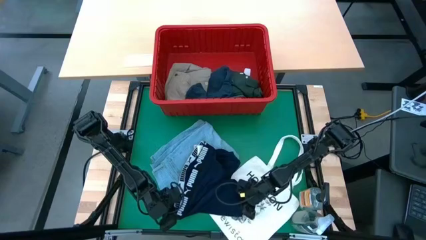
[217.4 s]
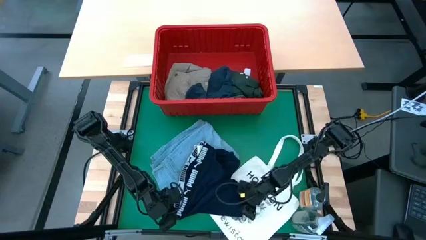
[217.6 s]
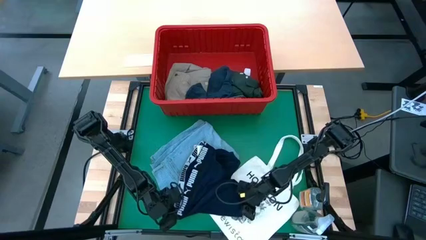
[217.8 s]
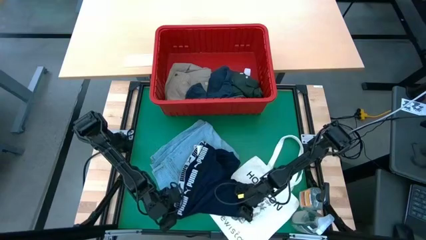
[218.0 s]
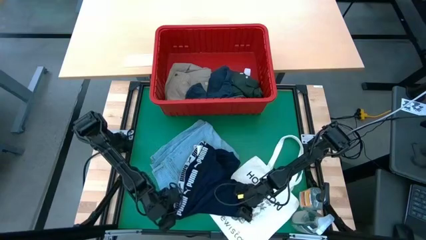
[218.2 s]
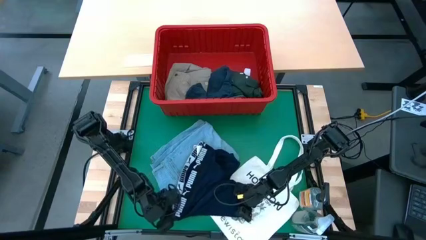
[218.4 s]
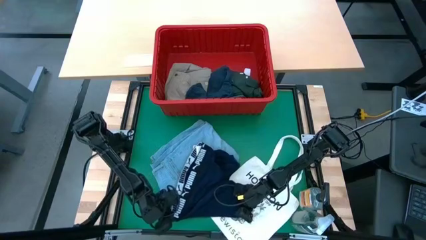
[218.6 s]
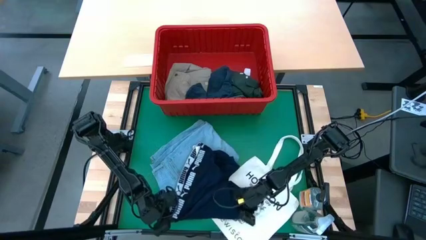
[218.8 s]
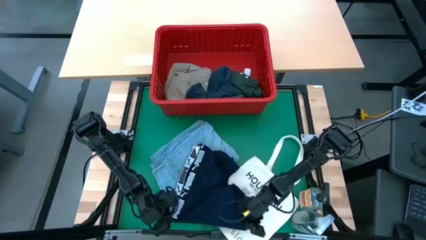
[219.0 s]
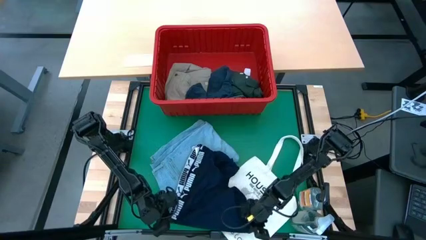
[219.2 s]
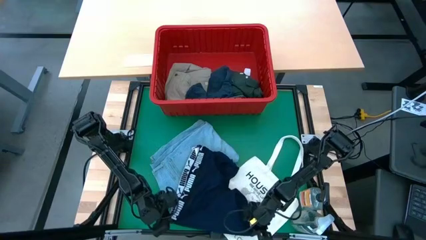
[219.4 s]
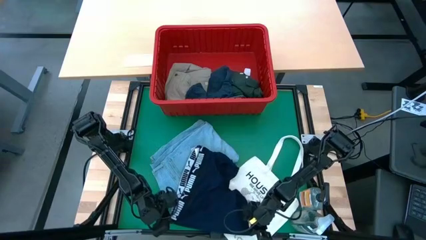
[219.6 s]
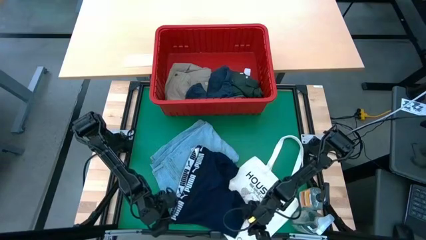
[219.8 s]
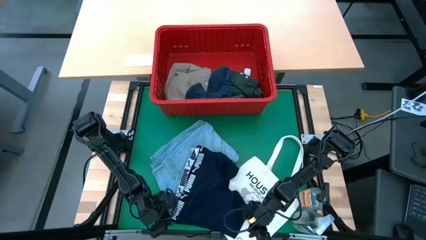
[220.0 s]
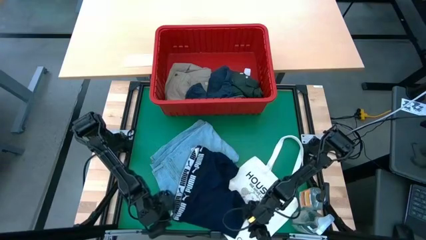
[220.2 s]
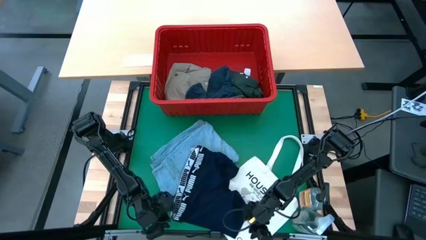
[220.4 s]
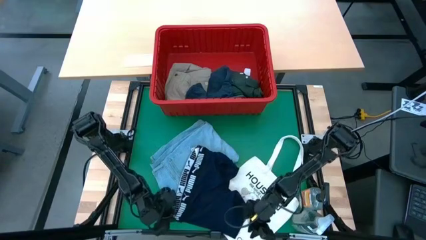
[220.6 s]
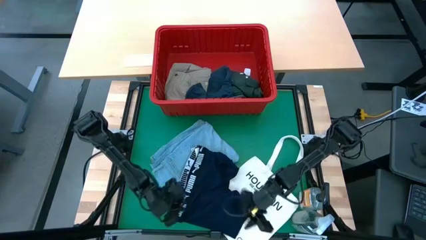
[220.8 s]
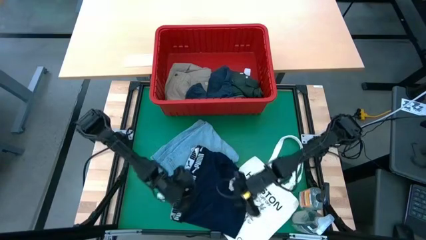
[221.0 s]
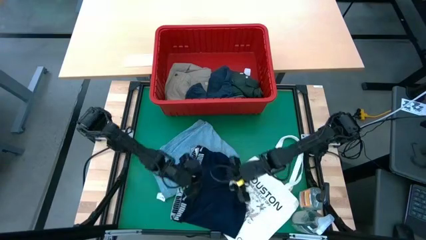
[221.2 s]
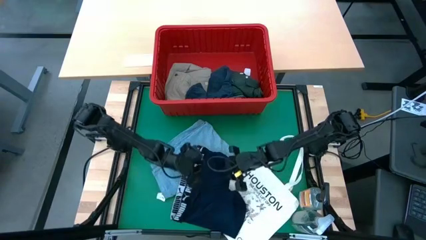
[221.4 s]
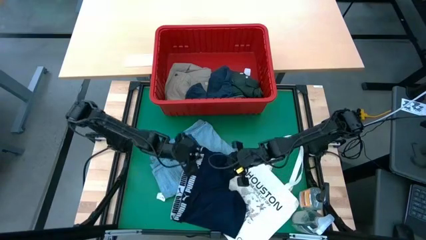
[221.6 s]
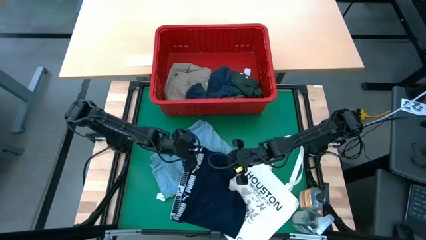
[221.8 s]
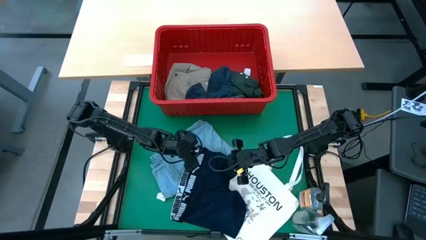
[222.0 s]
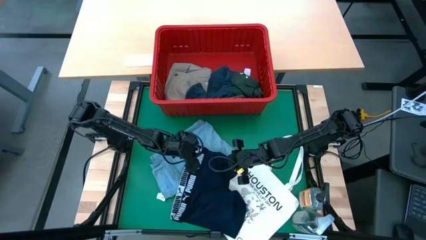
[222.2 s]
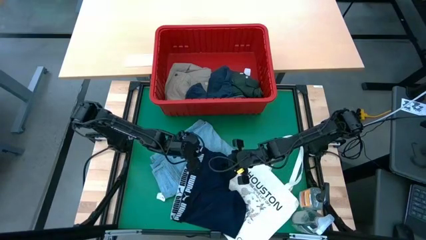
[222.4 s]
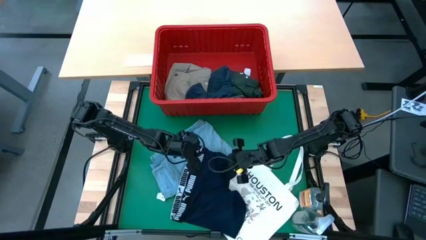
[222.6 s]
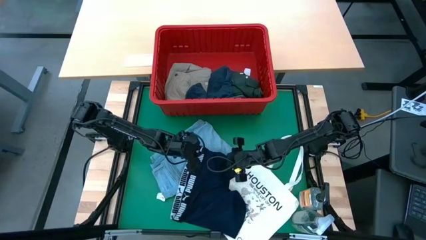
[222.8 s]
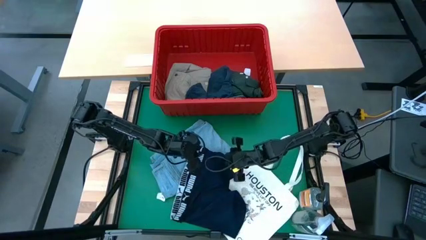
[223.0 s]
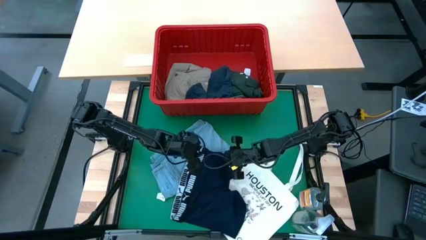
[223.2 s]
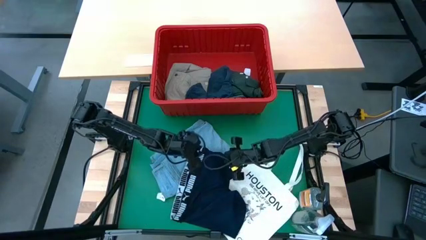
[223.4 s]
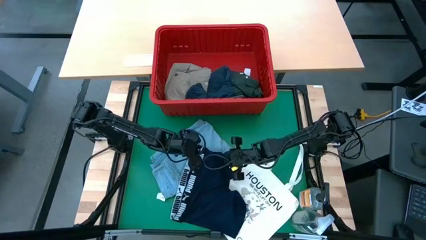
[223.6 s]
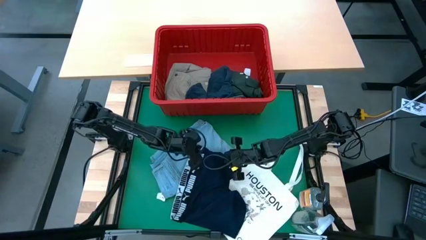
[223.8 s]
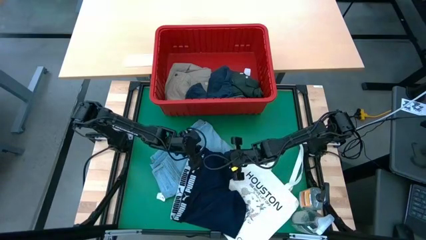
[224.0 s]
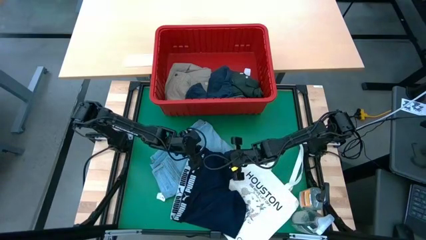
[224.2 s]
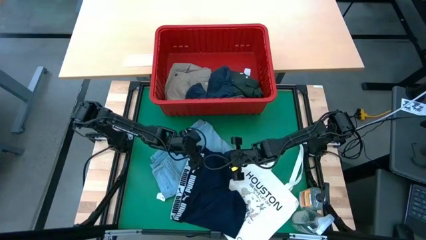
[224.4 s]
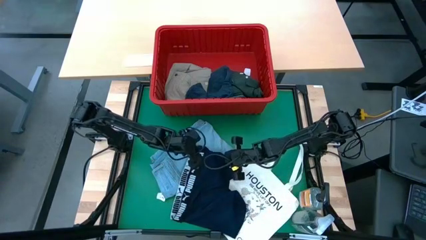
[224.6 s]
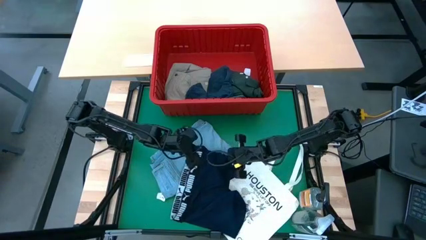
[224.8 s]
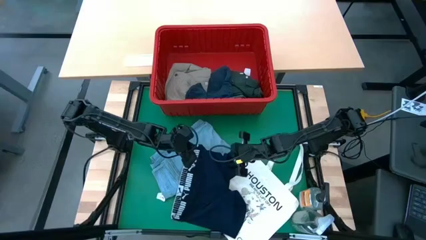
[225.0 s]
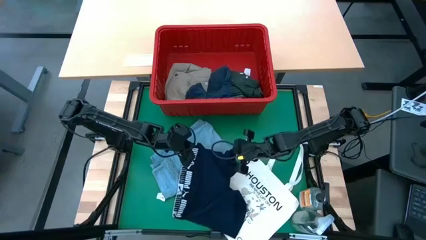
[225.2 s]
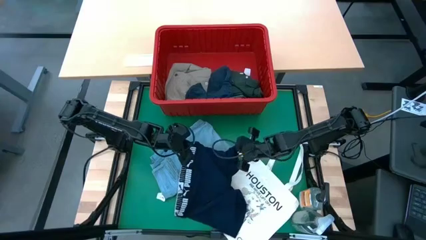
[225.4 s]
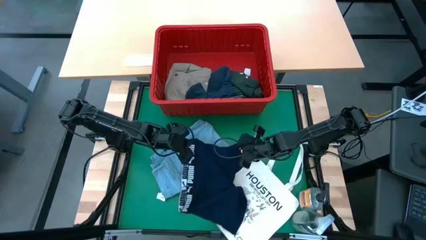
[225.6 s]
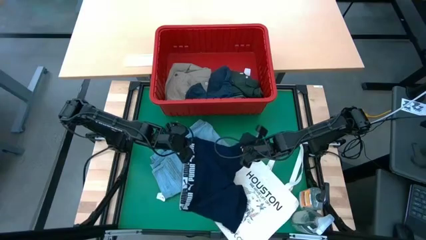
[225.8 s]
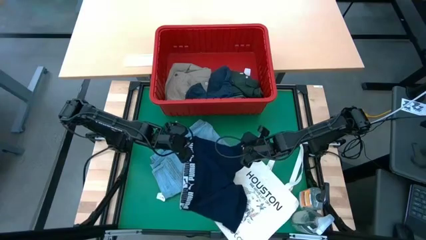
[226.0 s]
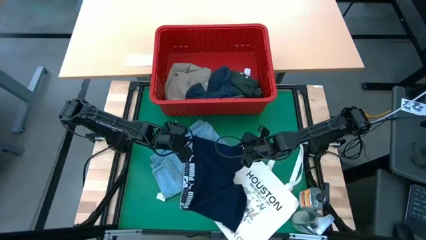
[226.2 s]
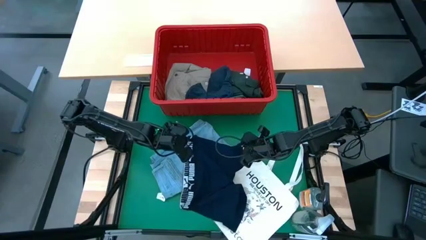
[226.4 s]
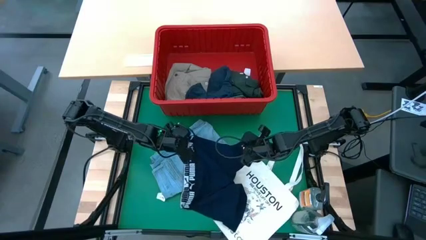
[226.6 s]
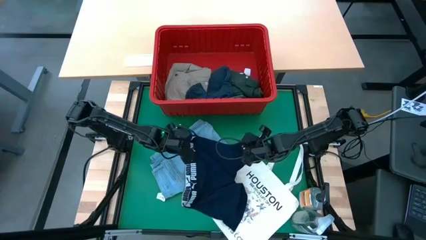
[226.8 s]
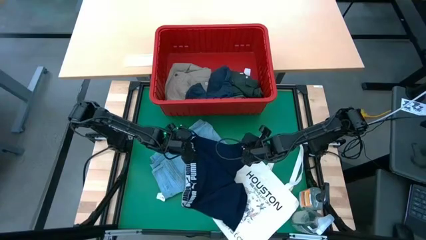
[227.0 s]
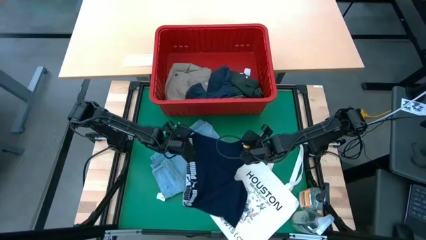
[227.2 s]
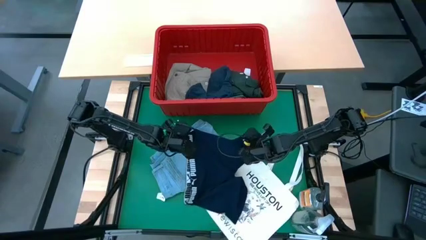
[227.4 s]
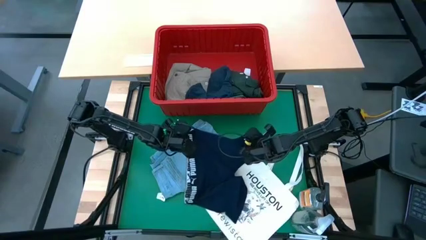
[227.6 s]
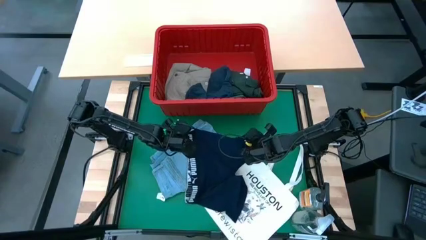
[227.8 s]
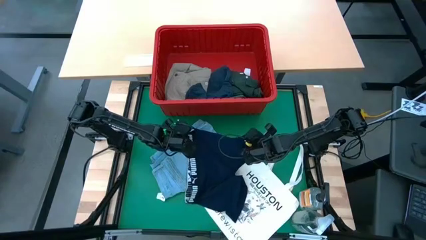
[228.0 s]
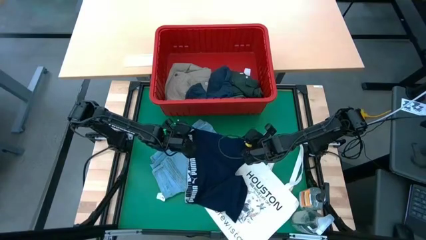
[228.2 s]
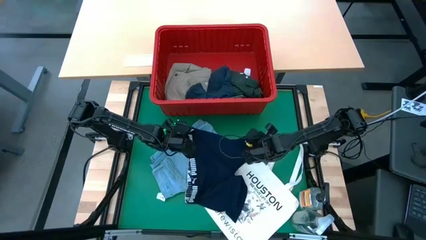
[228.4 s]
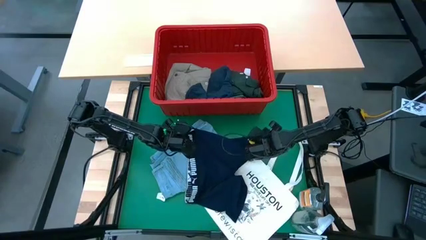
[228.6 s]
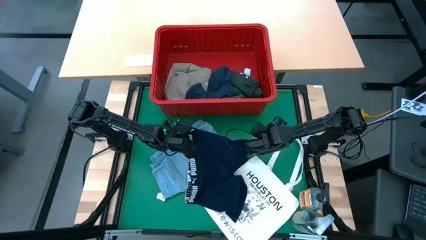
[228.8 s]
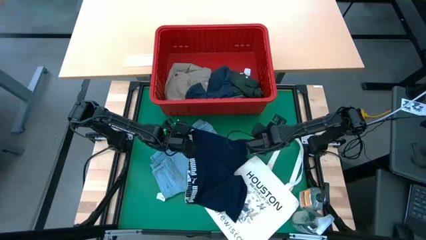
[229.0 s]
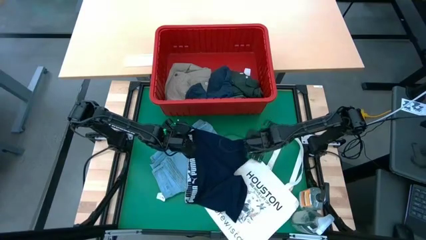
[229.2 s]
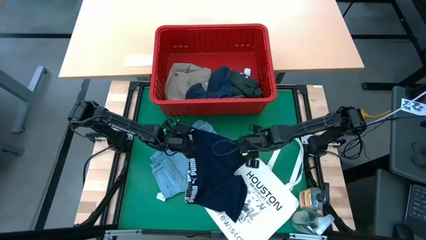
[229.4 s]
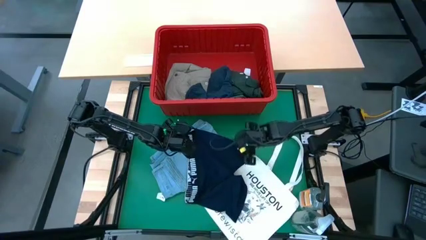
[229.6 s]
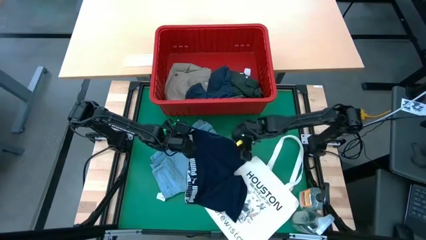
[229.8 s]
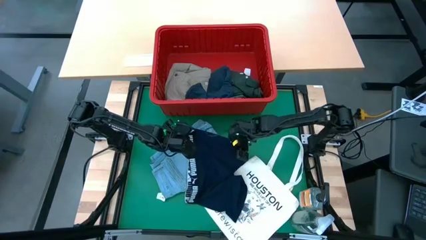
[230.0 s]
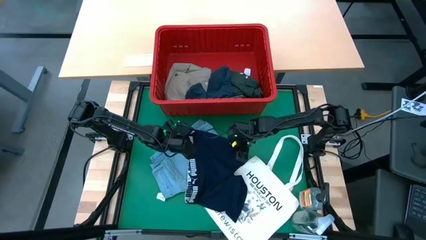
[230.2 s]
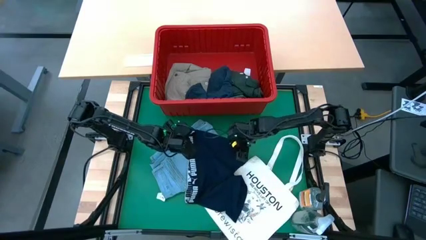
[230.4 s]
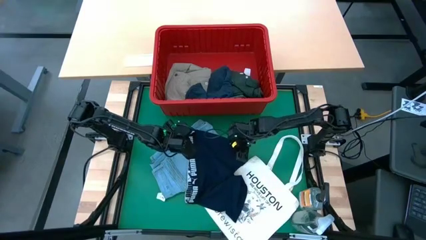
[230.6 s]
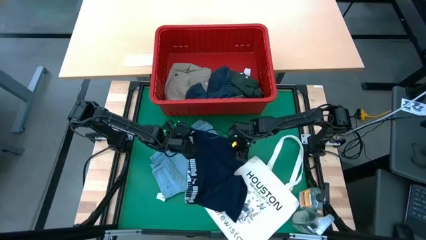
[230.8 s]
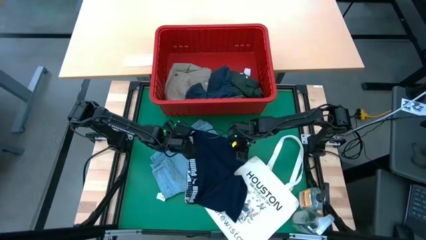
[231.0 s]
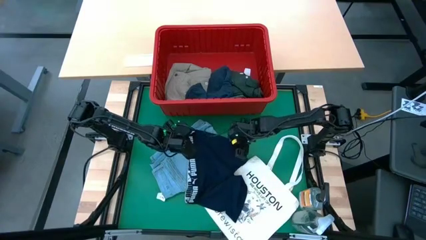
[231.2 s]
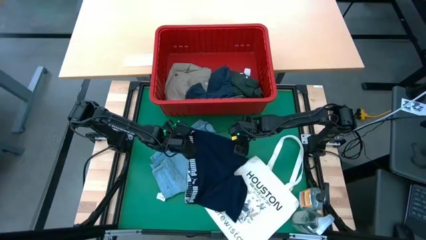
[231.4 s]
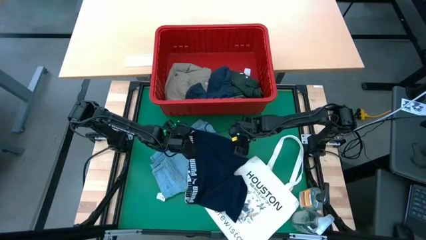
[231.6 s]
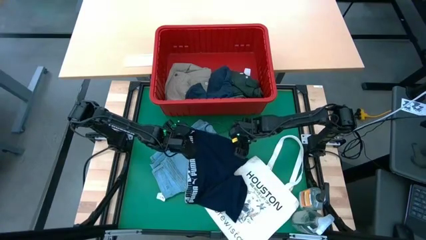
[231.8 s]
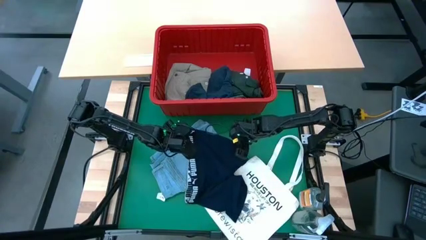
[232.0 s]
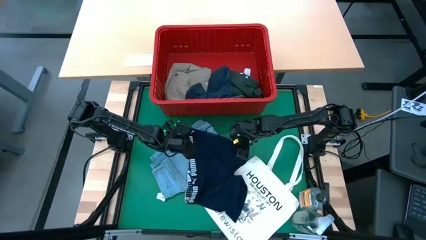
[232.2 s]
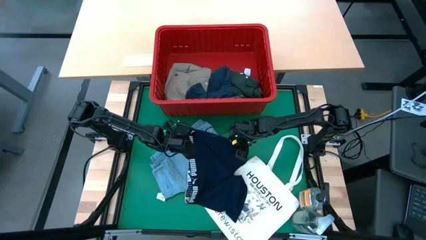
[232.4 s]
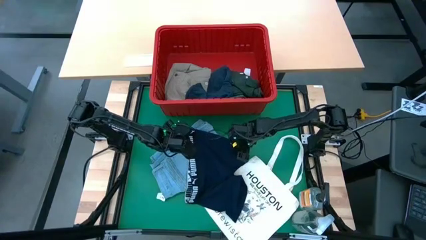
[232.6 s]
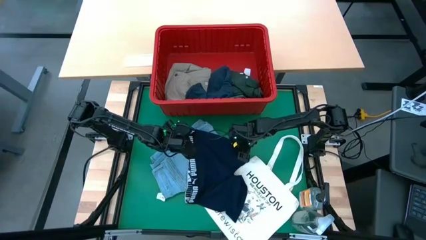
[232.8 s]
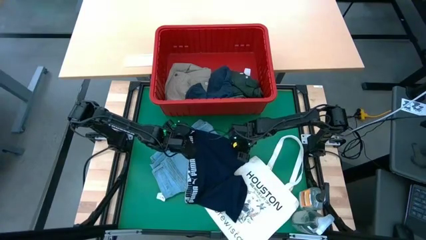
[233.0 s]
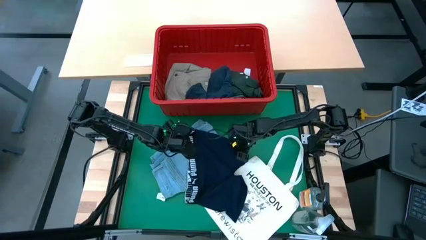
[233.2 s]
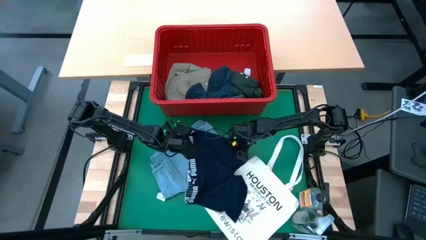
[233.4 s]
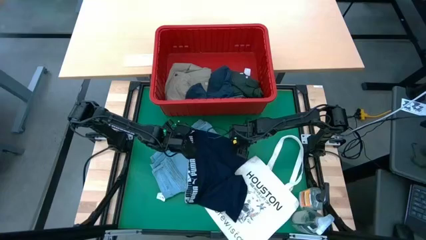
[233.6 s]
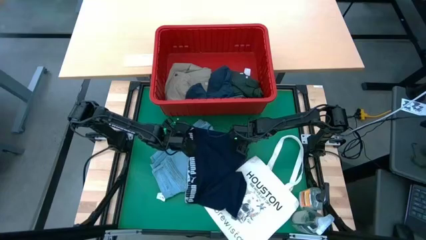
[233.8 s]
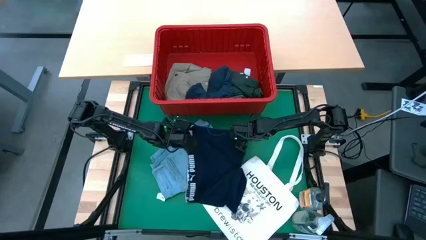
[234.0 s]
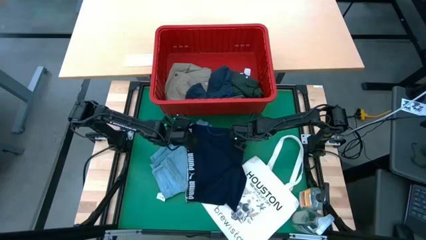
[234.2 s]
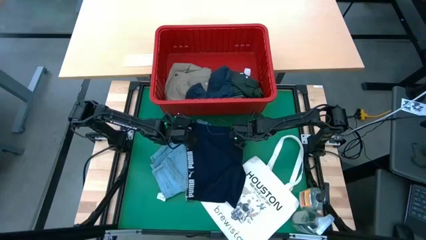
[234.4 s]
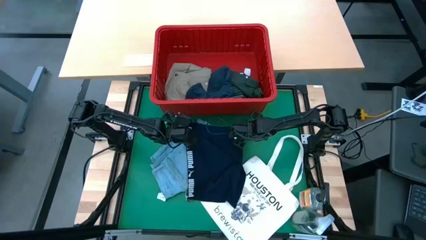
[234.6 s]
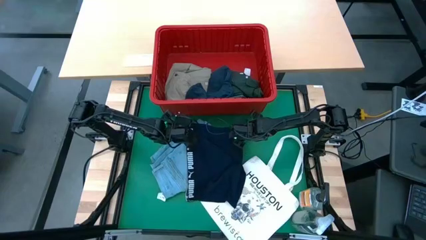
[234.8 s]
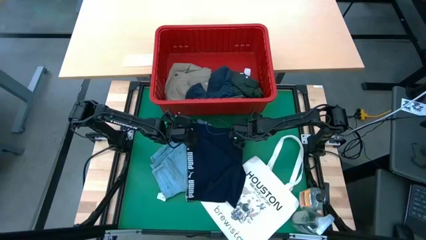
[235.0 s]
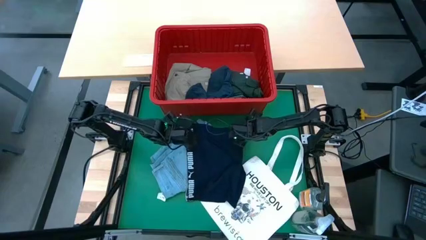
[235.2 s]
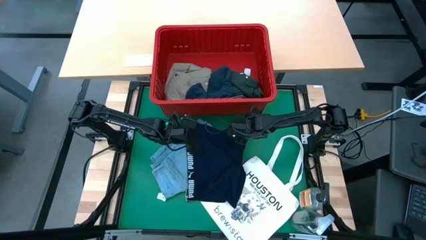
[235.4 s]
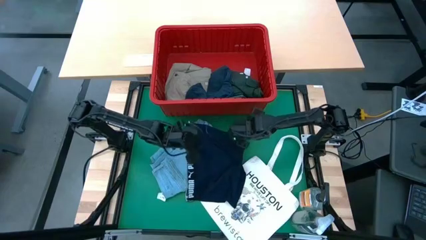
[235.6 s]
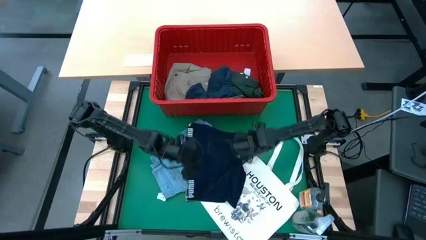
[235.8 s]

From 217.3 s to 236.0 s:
Task: Fold Laundry from Bin
Fold the dark blue boxer shorts
